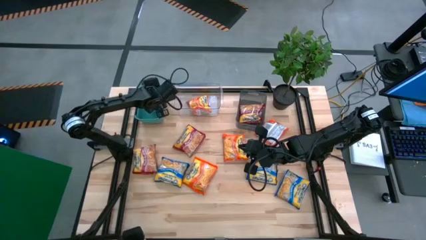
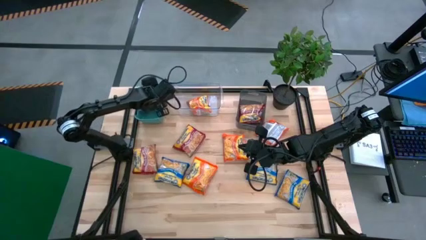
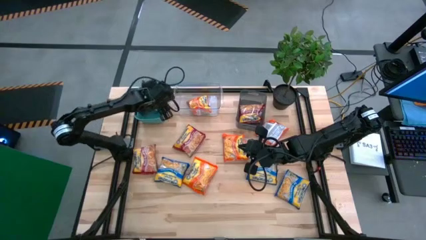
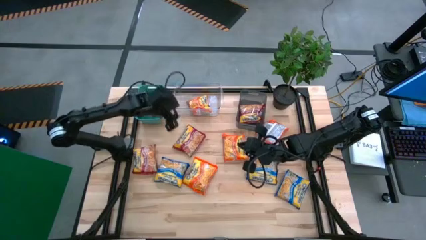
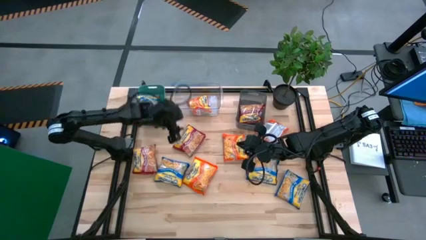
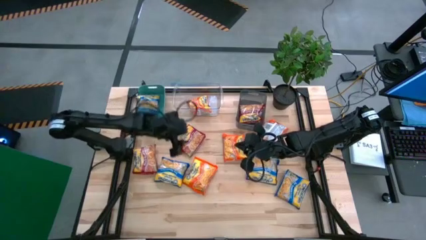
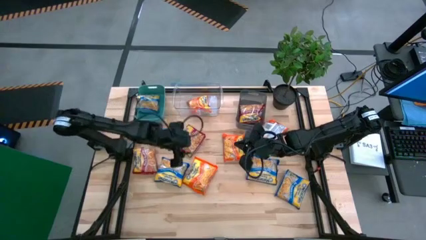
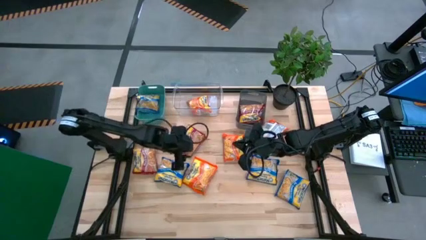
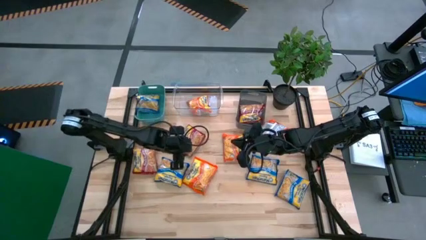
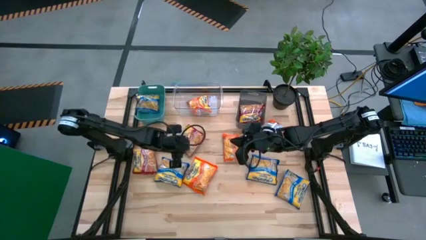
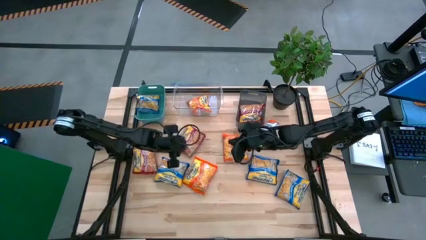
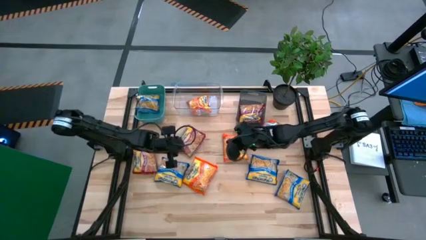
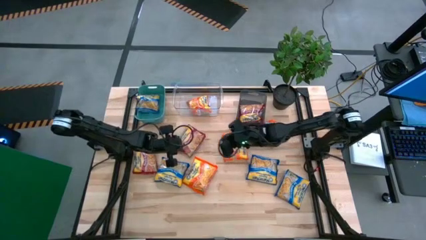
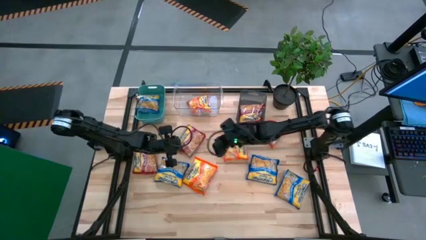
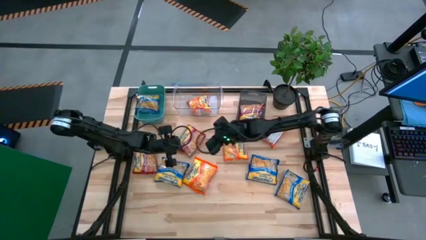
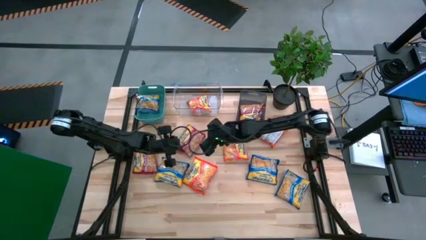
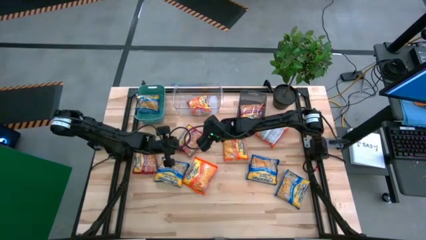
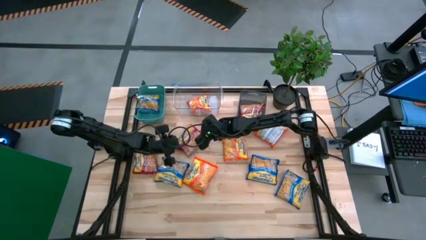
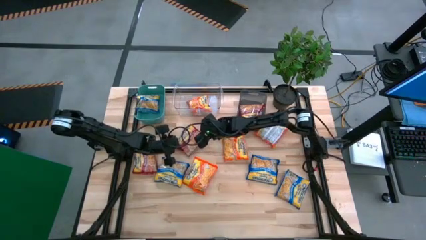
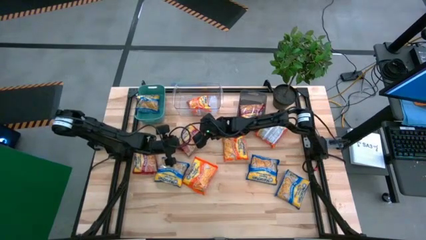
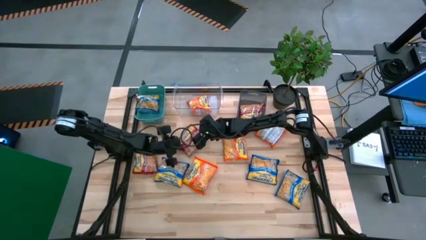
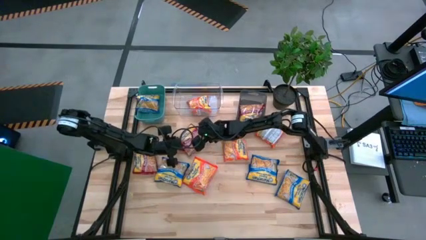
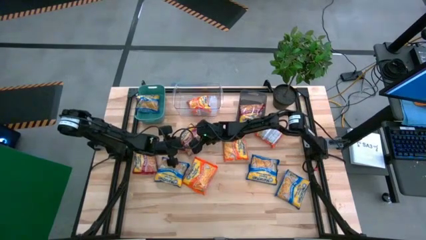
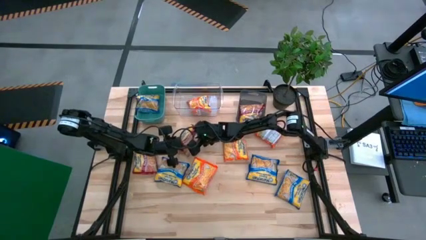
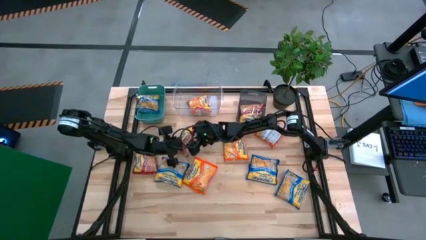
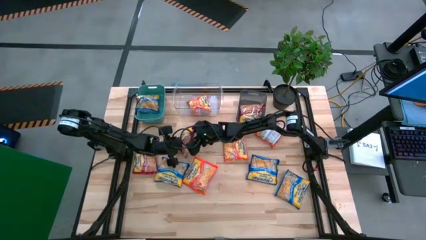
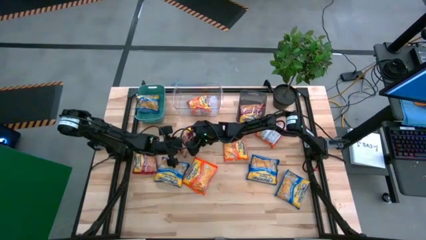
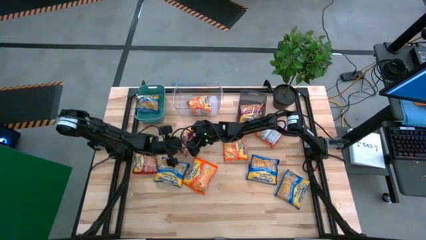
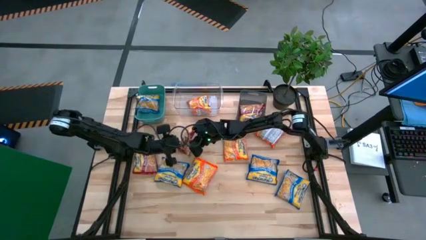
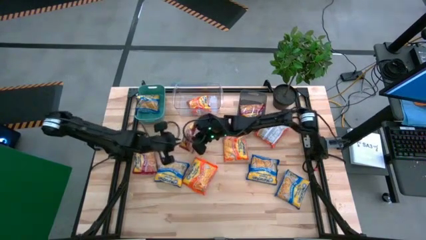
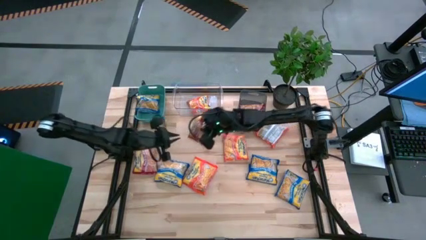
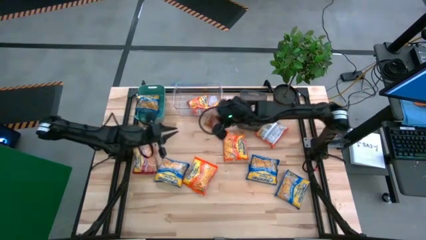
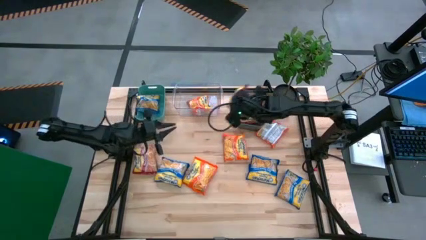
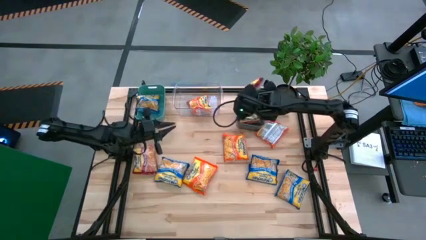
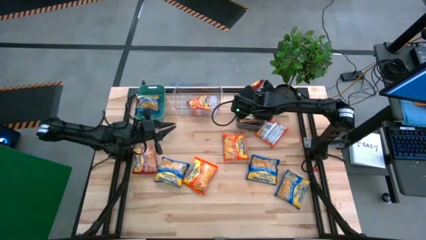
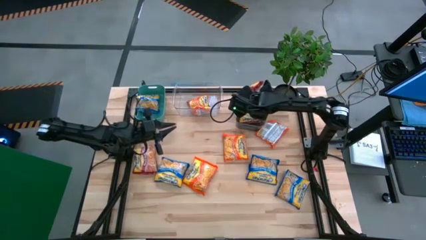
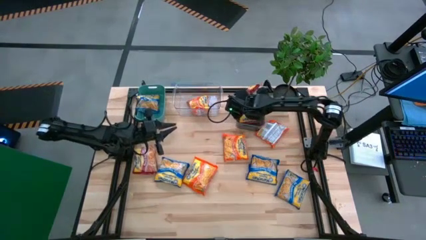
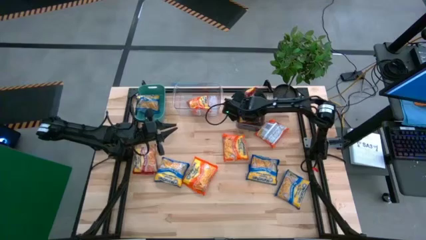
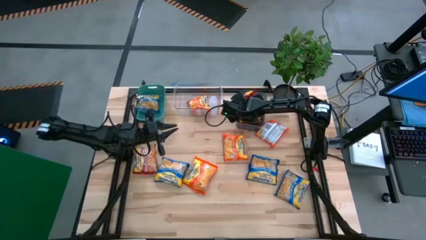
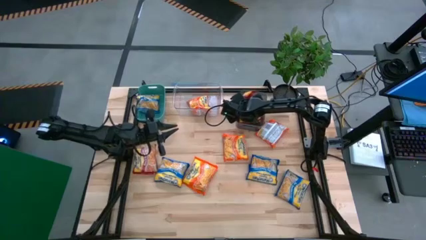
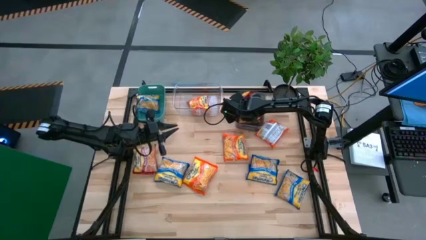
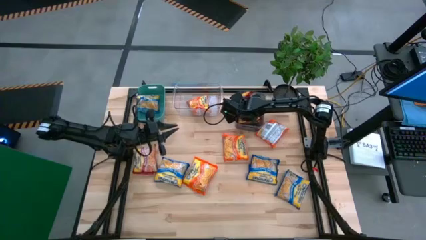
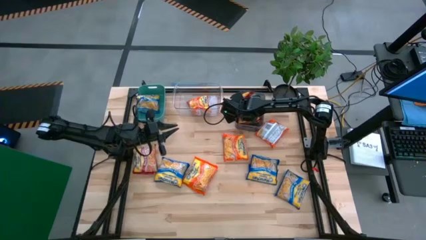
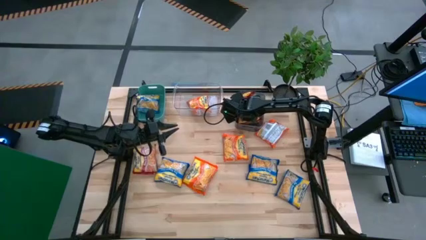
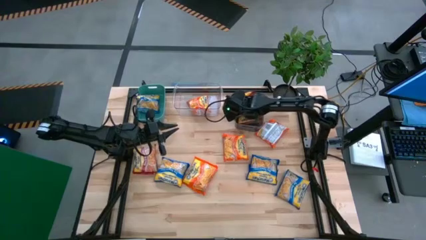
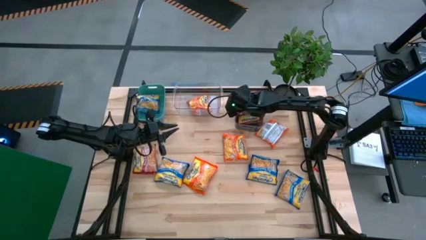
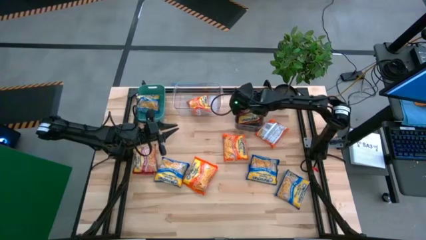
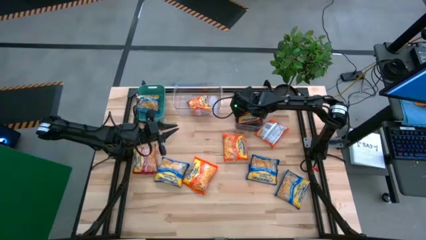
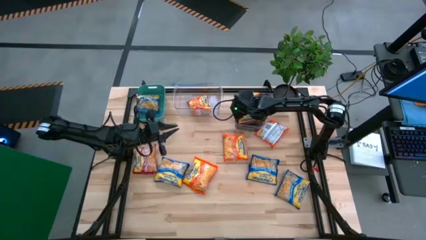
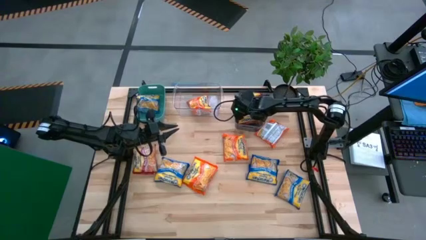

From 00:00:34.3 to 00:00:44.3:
Task: Sort Maruchan noodles
Put the red noodle pack into the black bin

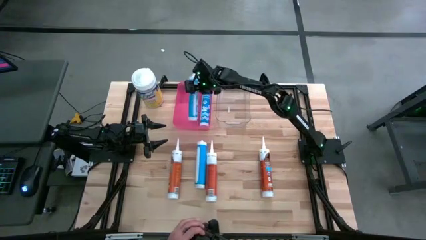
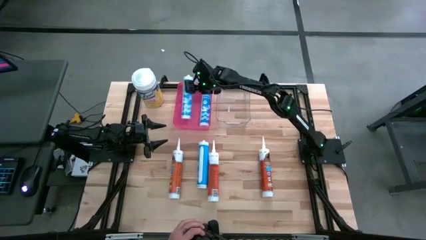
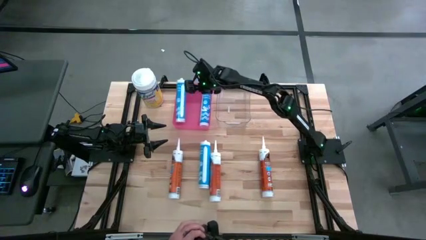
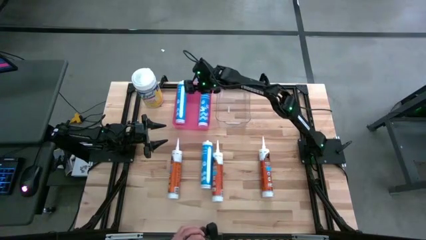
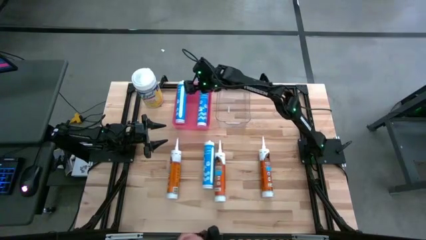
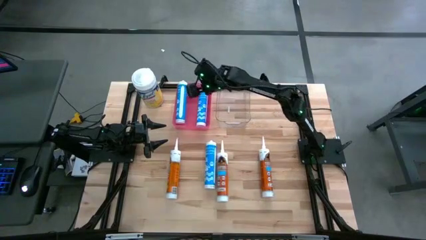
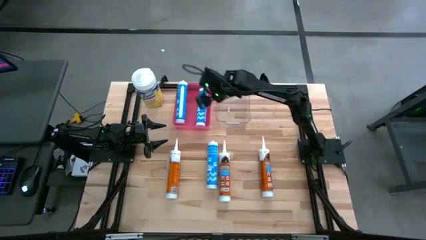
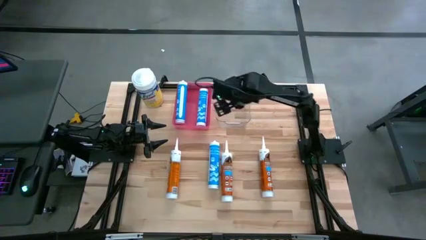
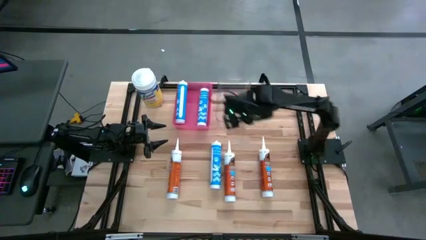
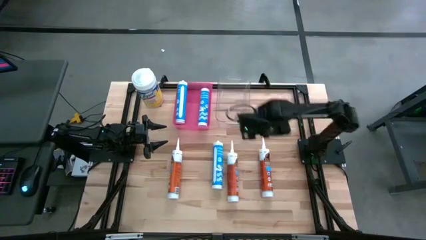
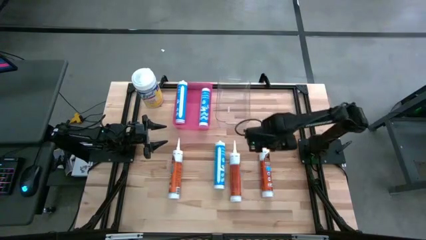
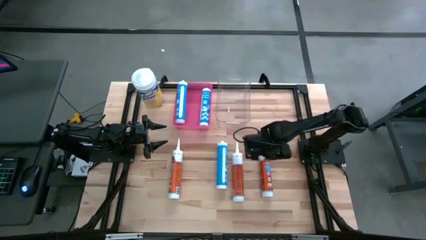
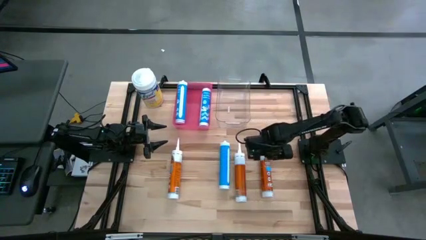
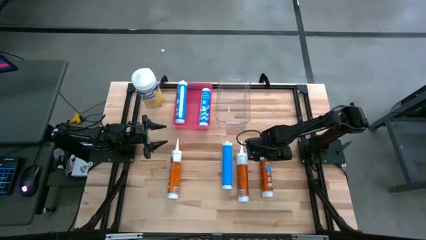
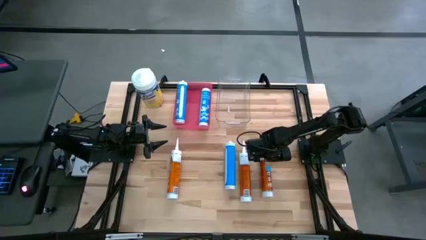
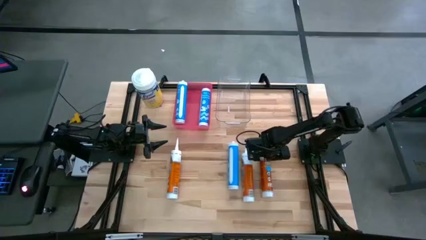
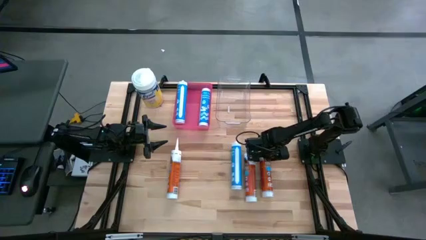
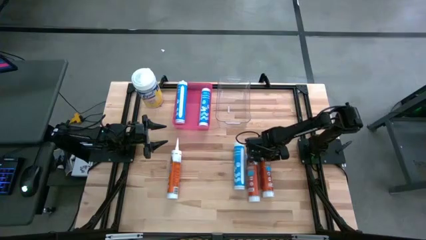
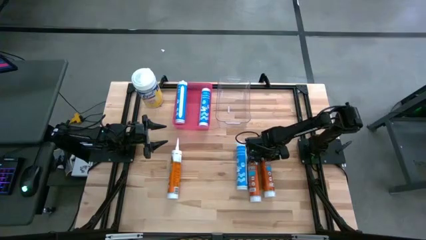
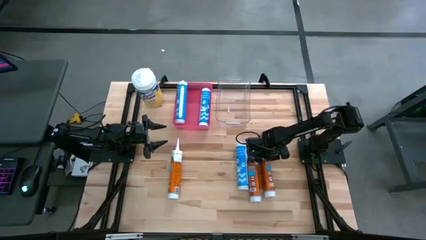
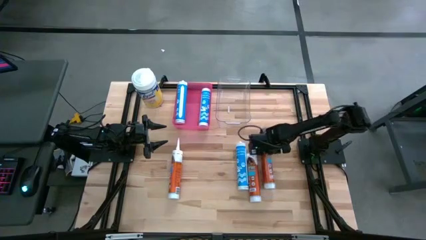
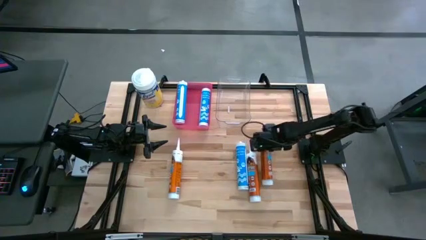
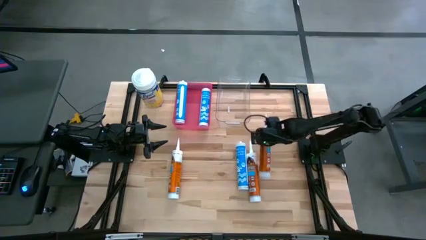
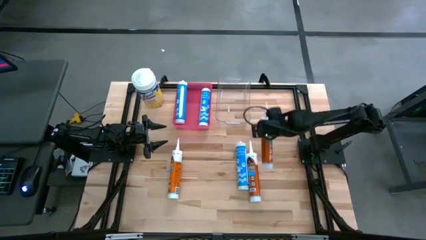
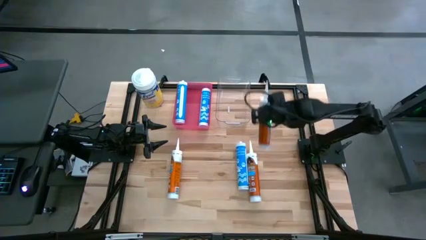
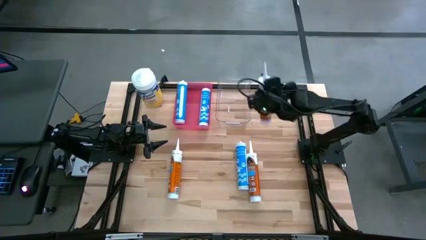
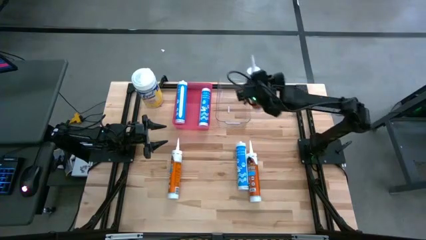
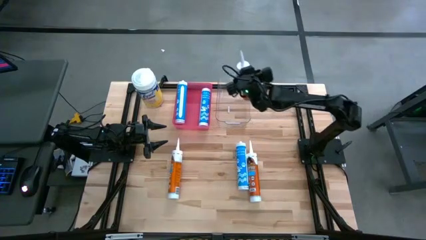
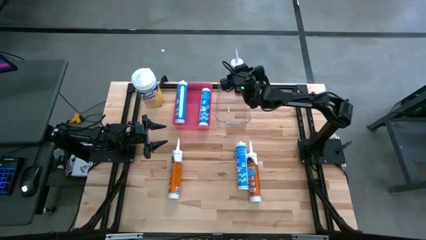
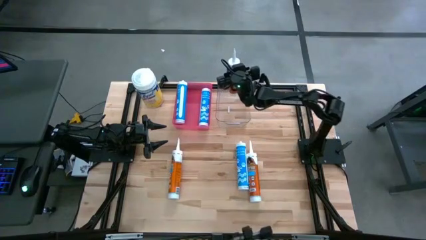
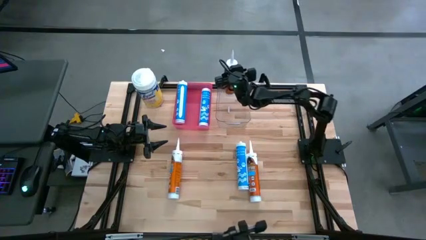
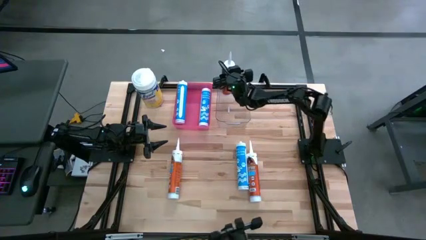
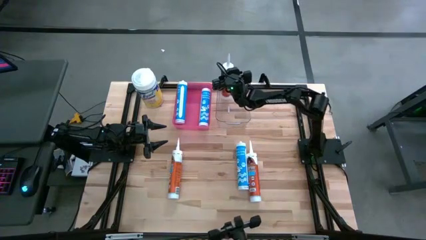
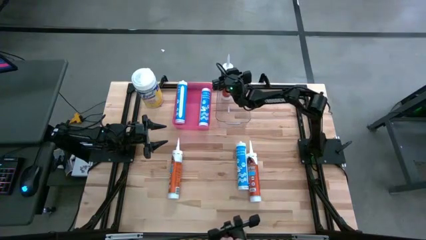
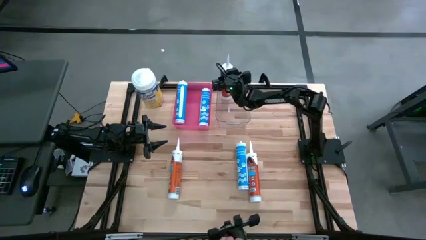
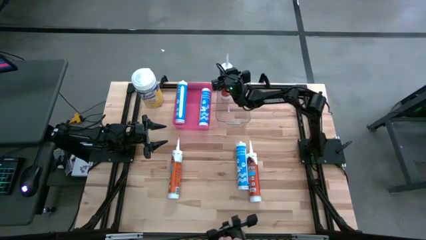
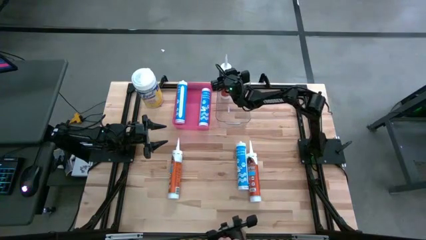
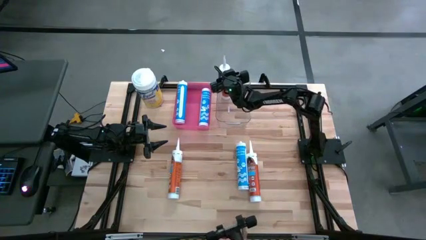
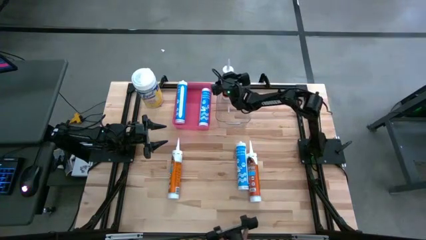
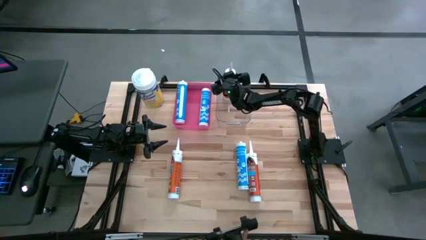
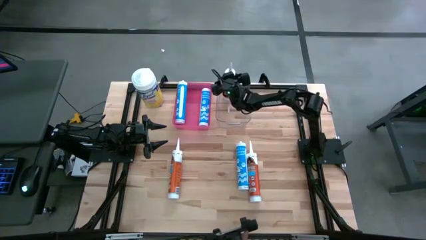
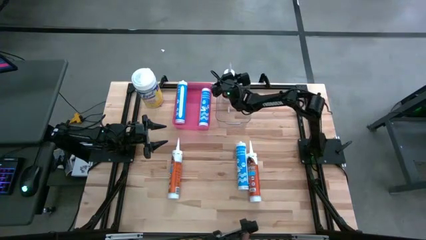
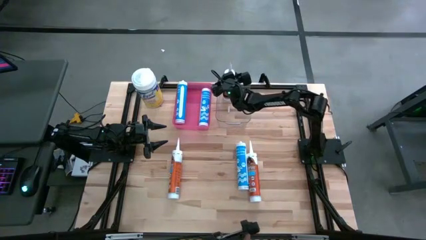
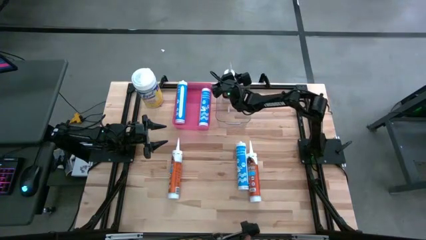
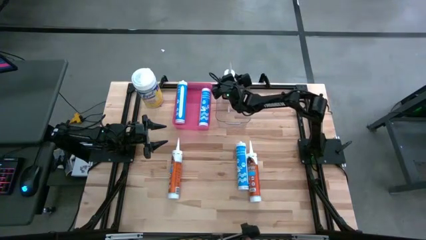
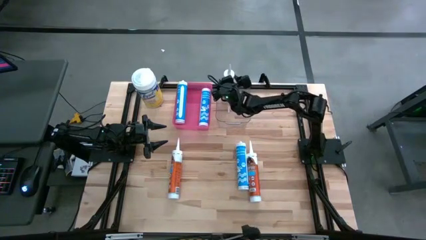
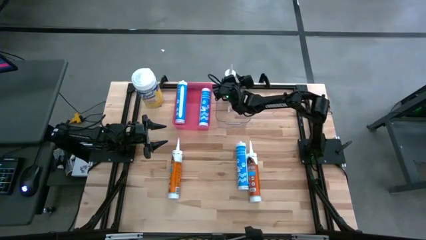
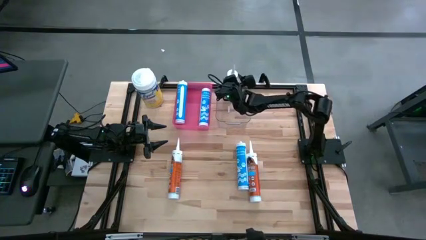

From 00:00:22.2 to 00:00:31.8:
Task: Sort silicone sealant tubes
Put the orange silicone sealant into the transparent bin
